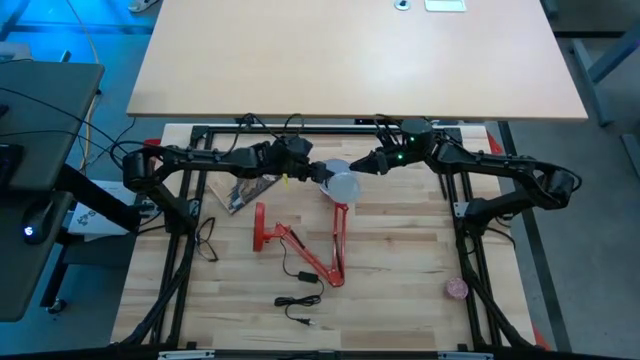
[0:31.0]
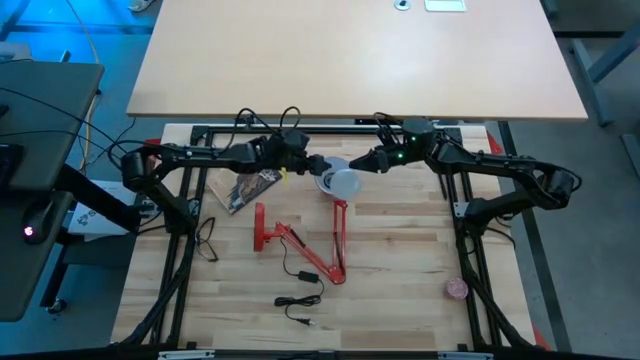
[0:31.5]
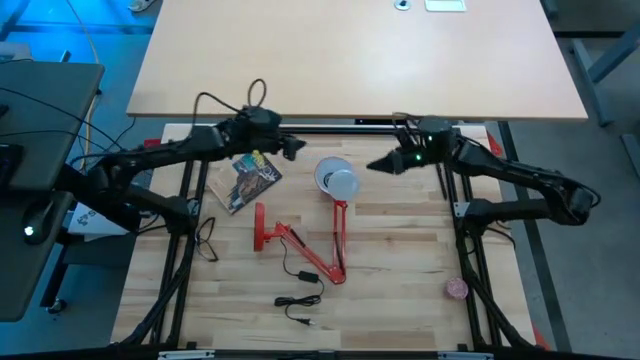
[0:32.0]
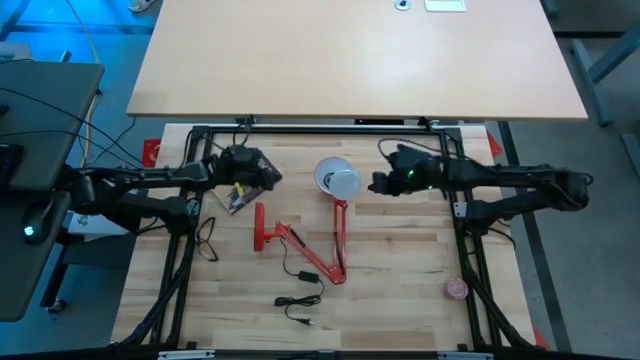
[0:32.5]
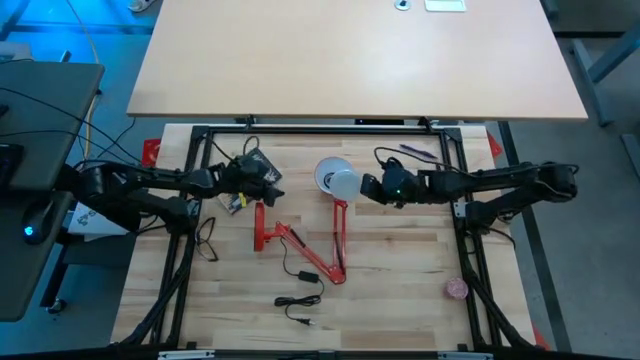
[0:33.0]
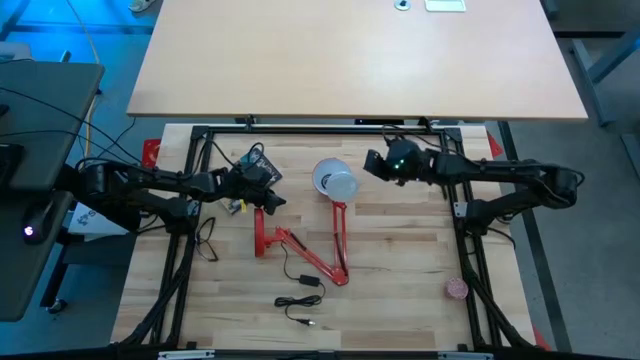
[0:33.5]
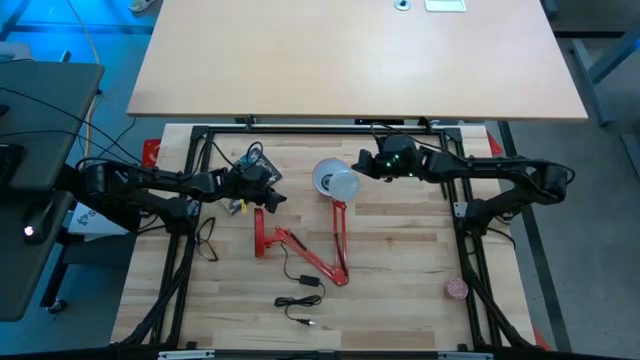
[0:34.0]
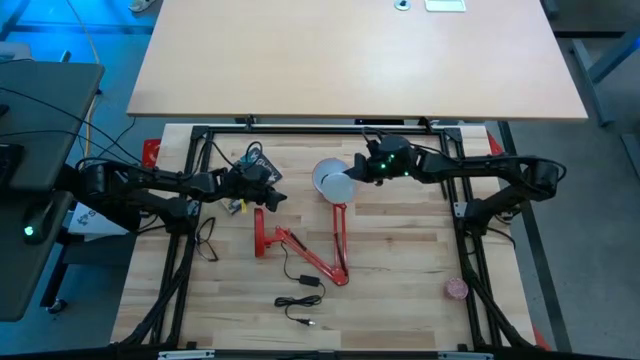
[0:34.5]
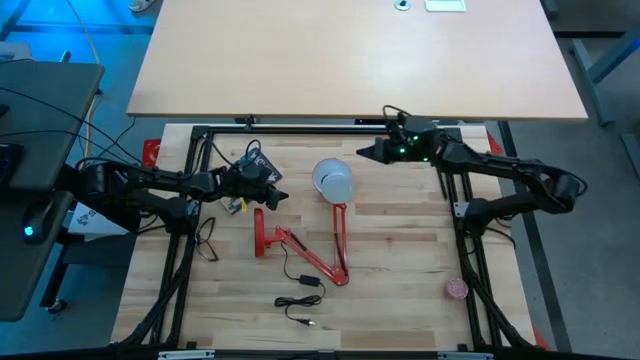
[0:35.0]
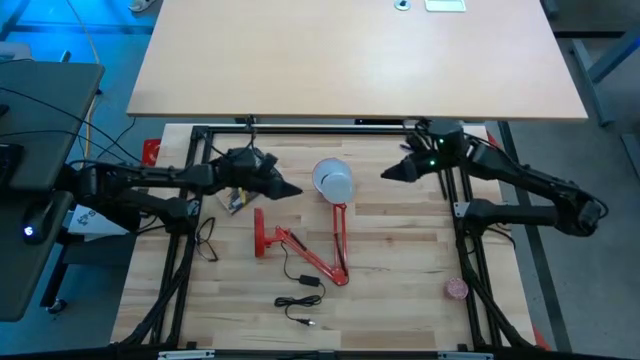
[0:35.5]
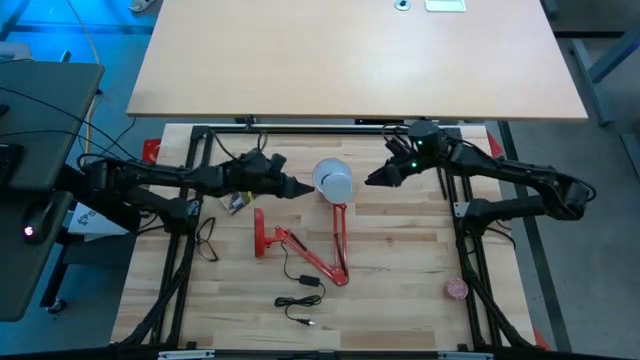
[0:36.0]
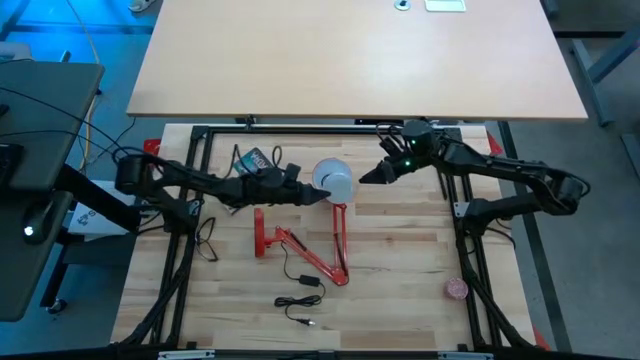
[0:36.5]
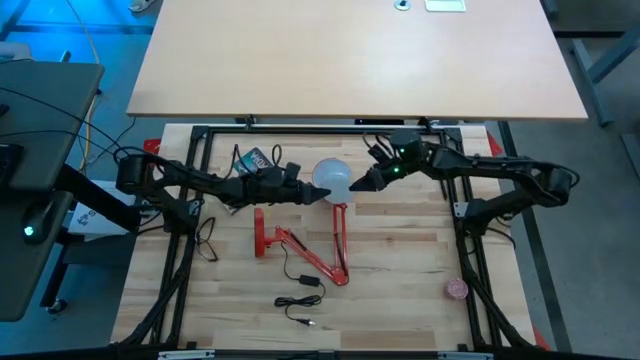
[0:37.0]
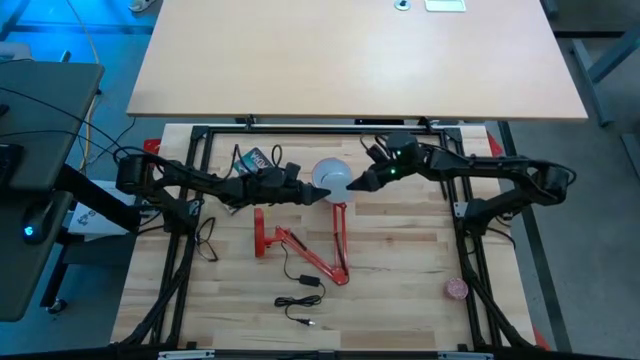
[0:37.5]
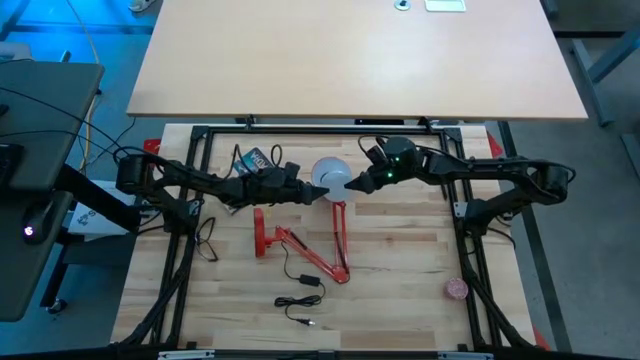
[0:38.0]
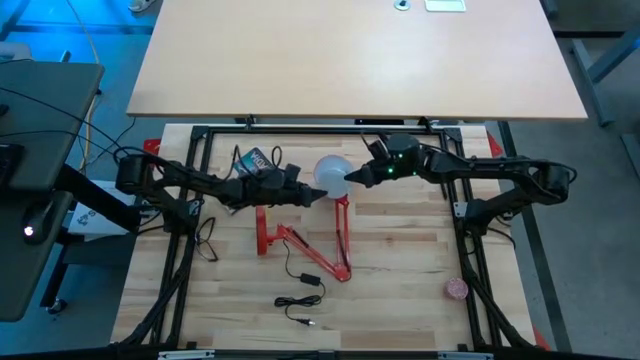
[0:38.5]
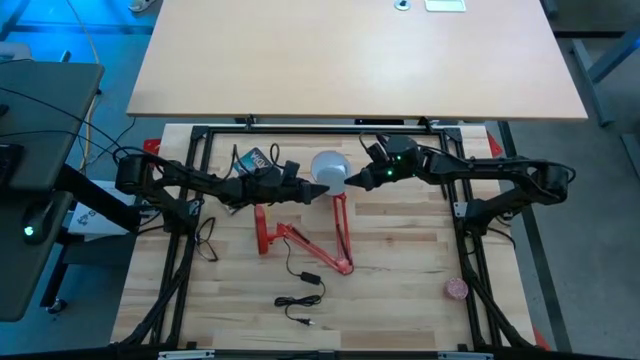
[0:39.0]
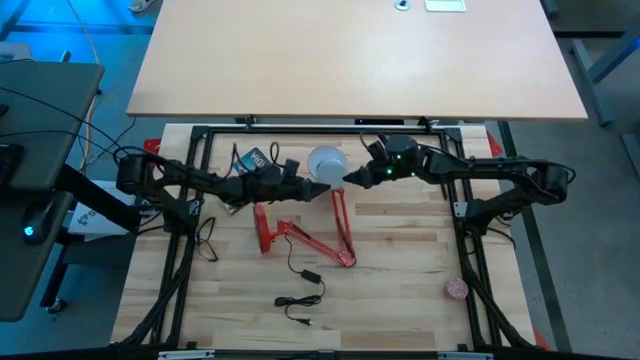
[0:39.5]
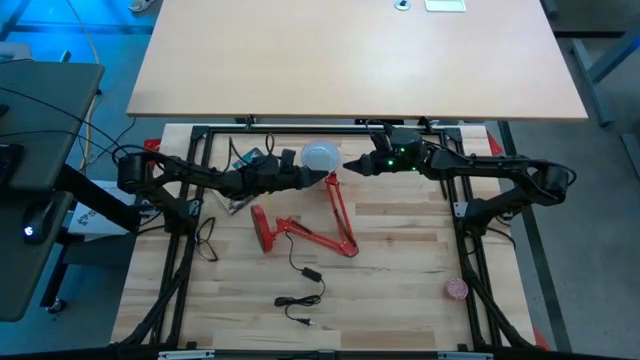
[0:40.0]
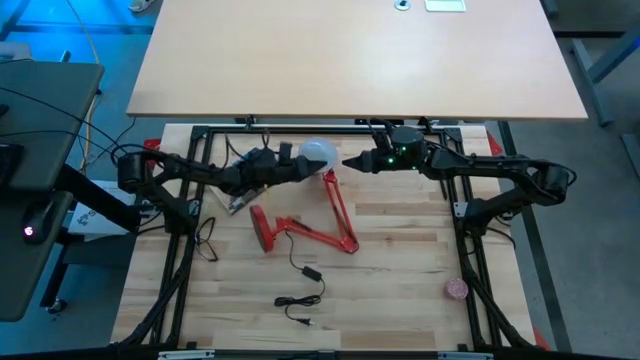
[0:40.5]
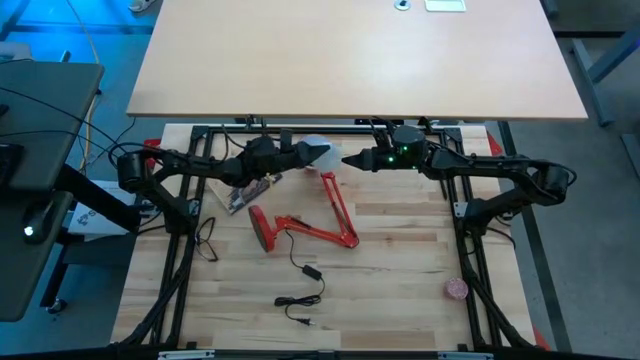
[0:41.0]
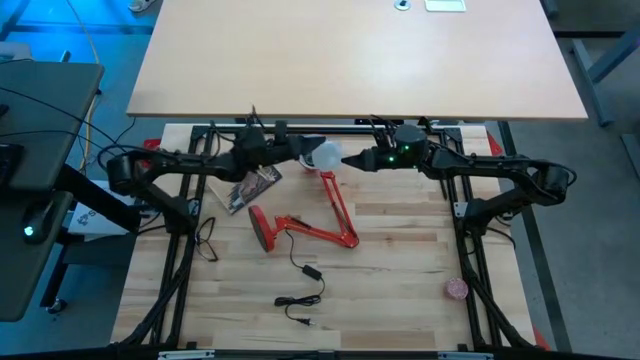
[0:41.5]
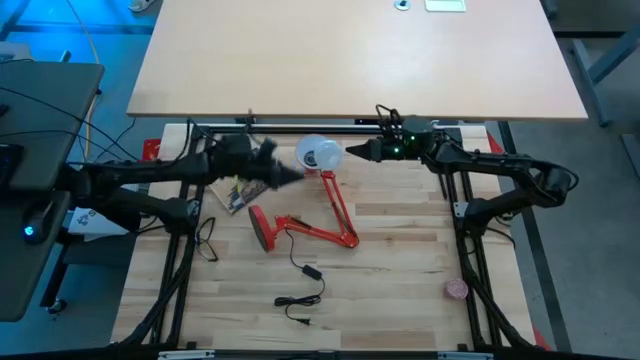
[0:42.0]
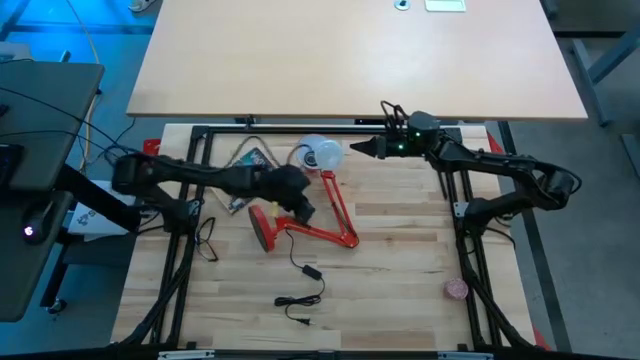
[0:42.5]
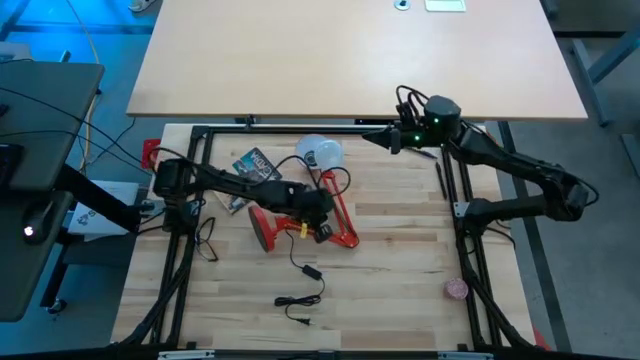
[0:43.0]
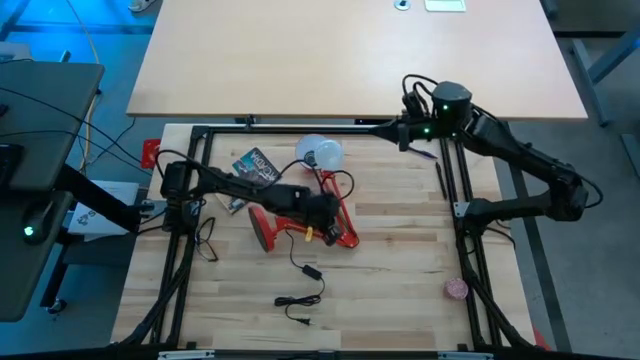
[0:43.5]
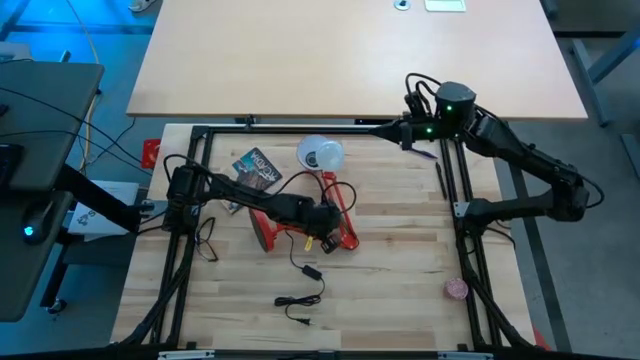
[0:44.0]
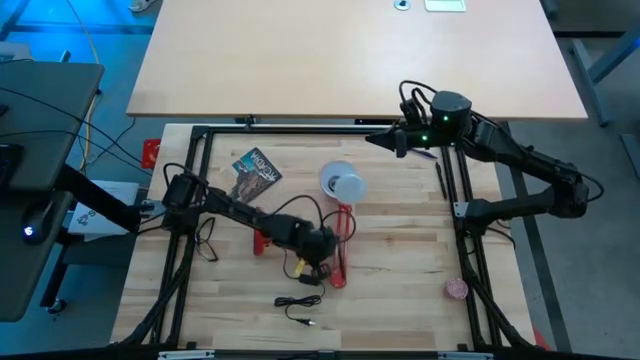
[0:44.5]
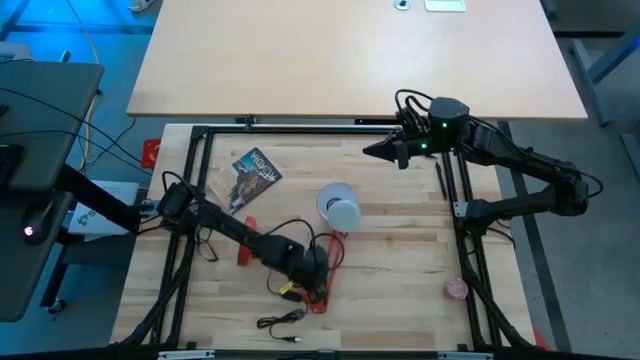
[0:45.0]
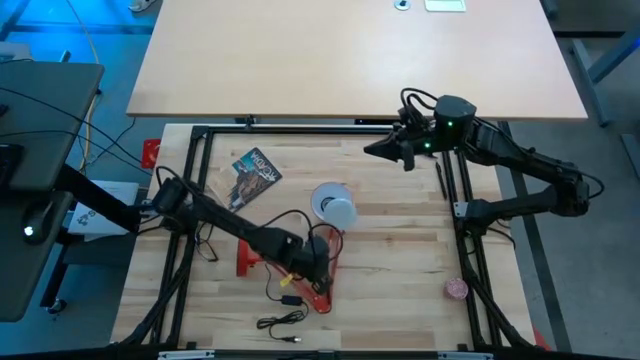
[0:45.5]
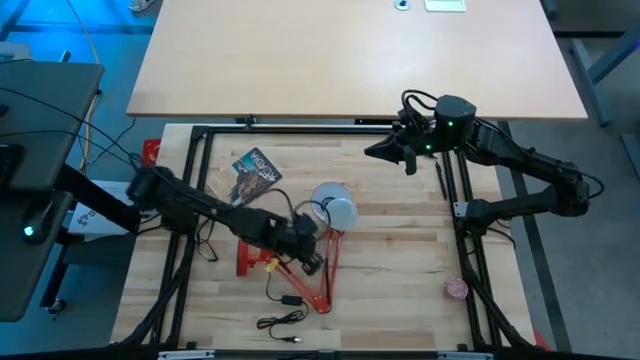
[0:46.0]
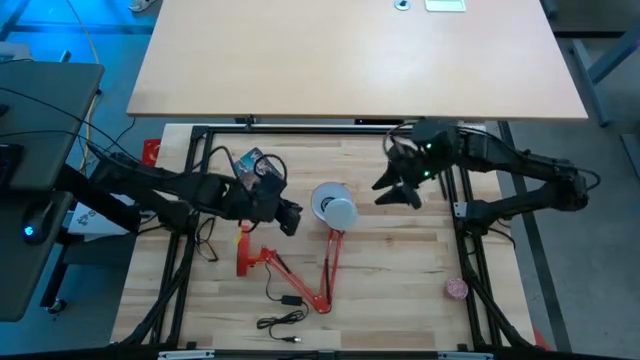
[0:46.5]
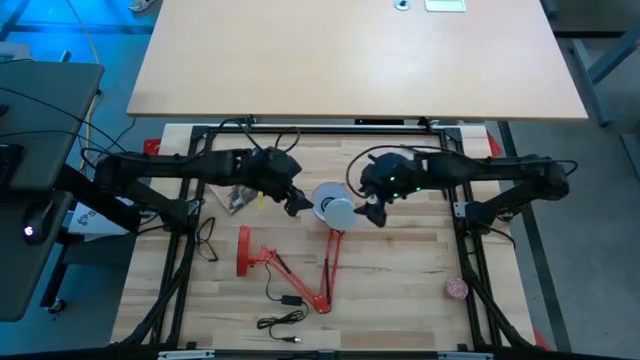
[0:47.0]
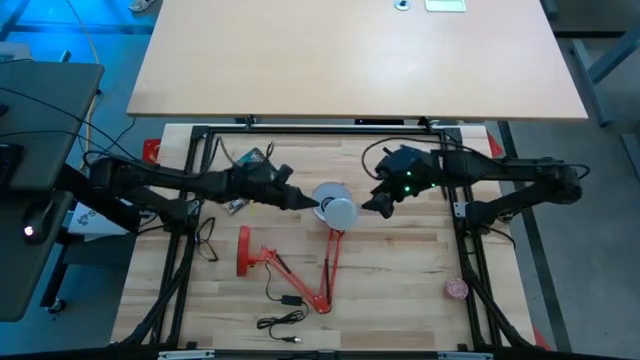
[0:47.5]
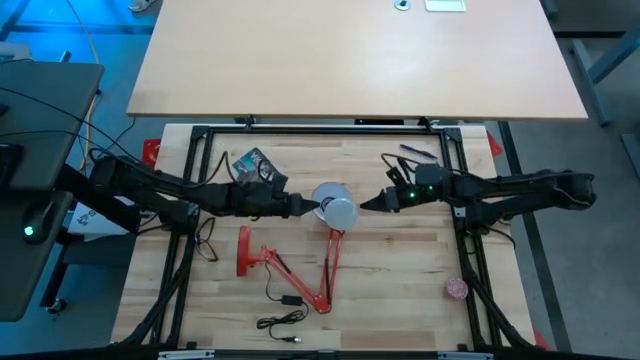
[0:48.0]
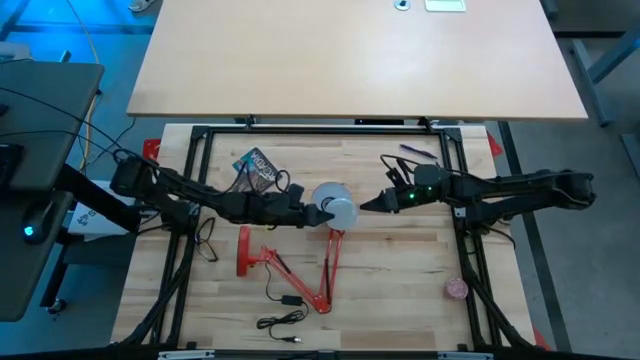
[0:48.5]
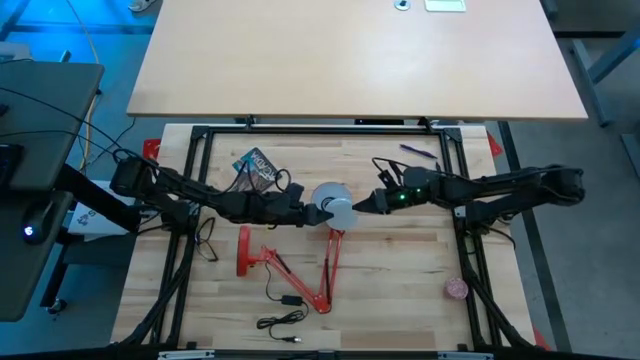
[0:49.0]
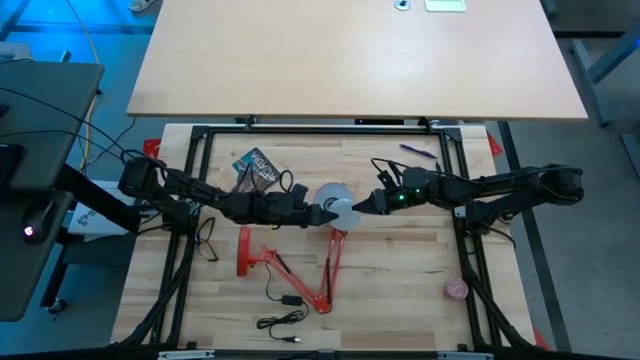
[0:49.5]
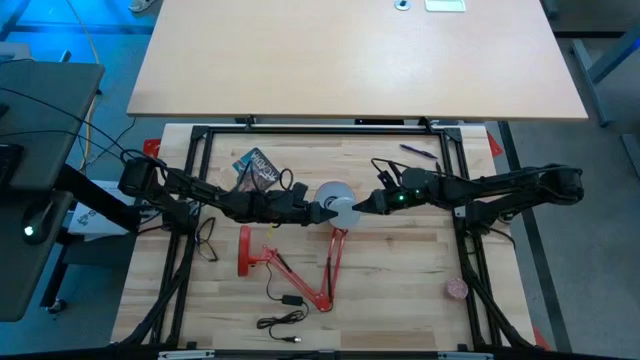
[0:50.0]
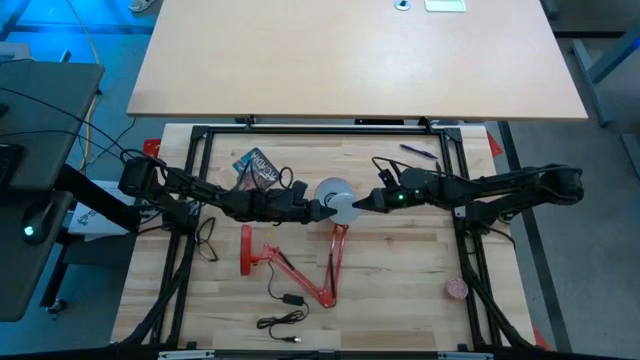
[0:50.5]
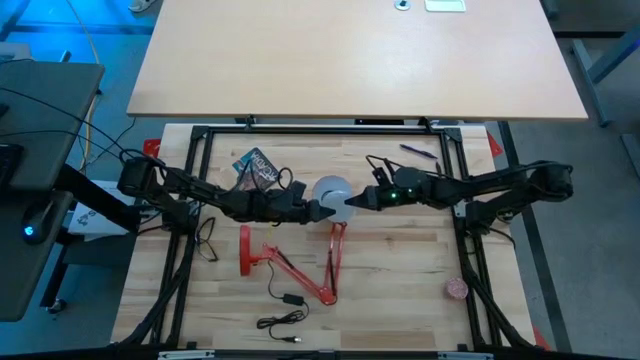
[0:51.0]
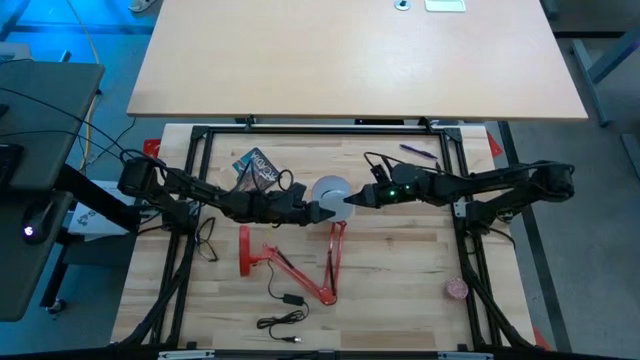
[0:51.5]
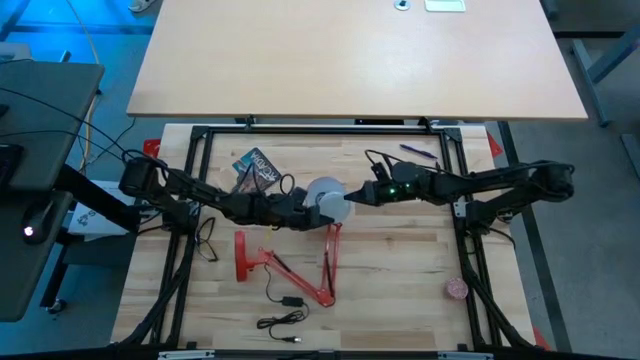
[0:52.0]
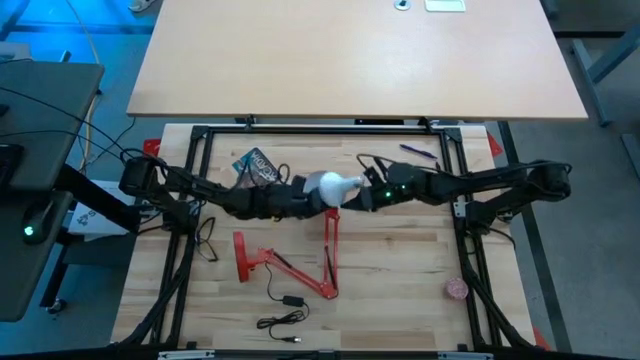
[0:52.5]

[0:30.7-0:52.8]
Task: Screw lightbulb
Insert the lightbulb into the red lamp
